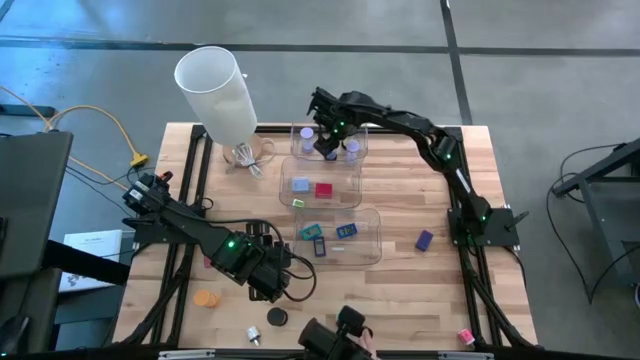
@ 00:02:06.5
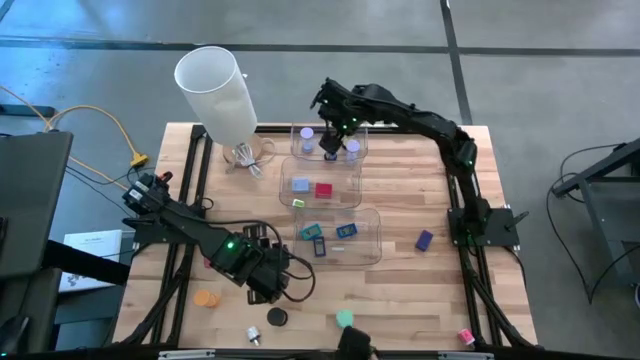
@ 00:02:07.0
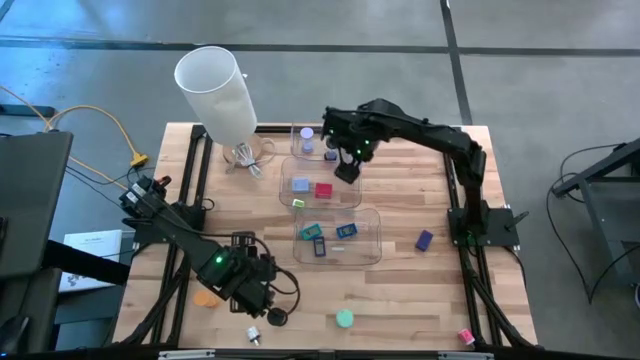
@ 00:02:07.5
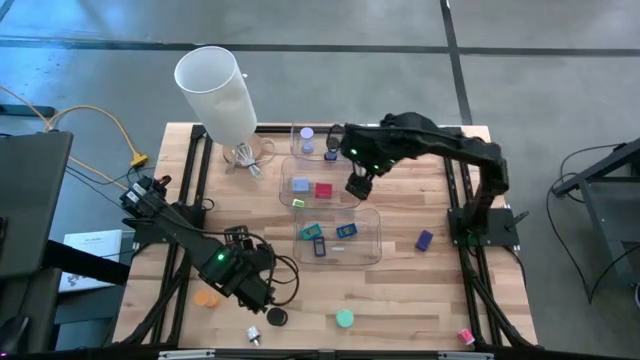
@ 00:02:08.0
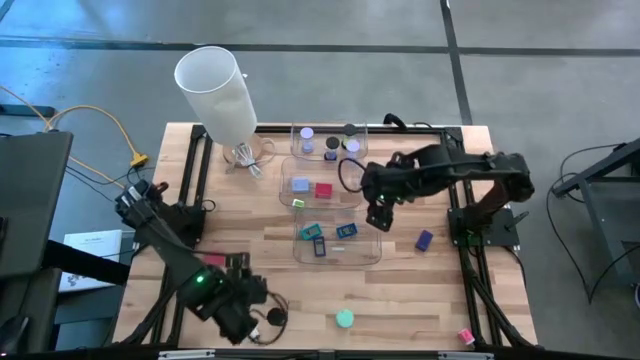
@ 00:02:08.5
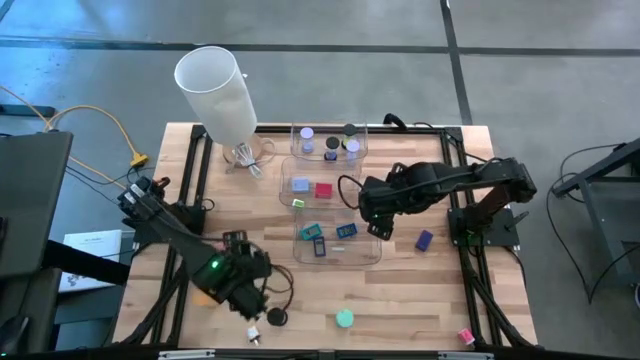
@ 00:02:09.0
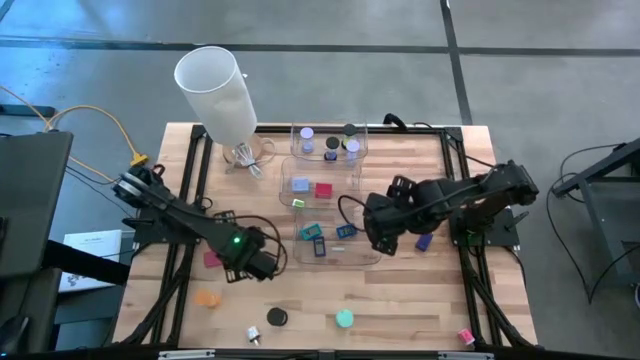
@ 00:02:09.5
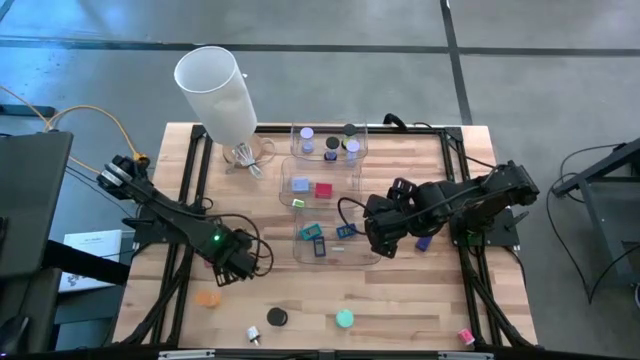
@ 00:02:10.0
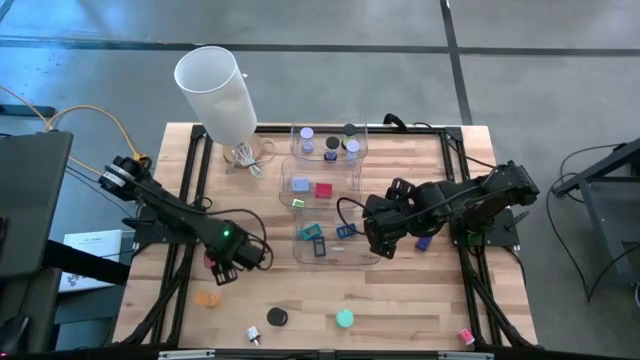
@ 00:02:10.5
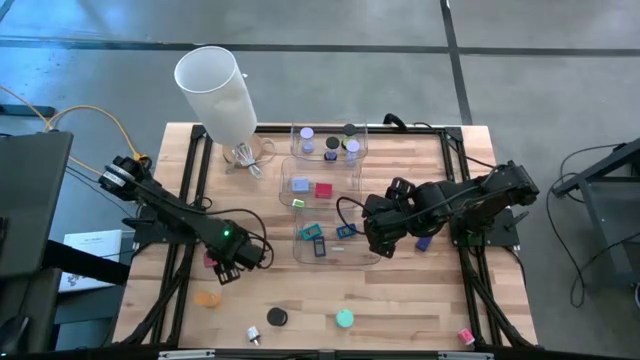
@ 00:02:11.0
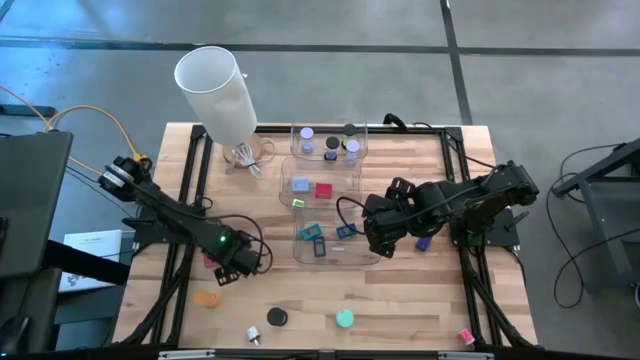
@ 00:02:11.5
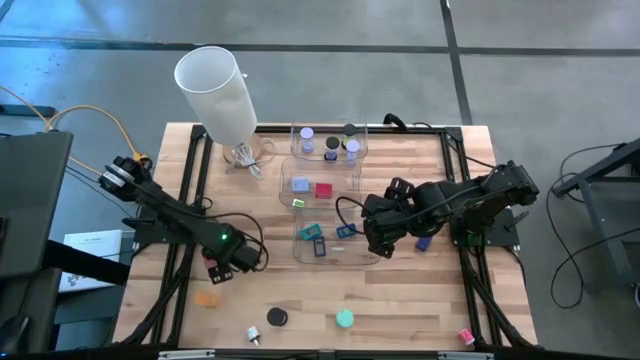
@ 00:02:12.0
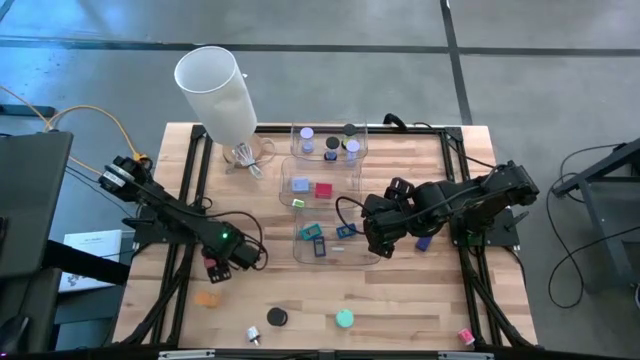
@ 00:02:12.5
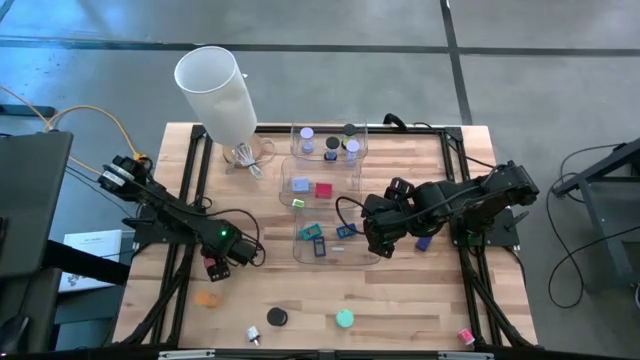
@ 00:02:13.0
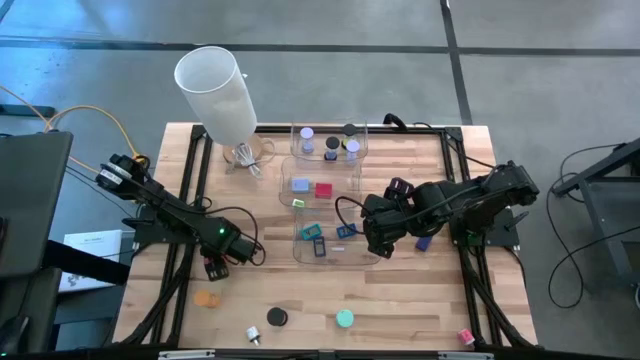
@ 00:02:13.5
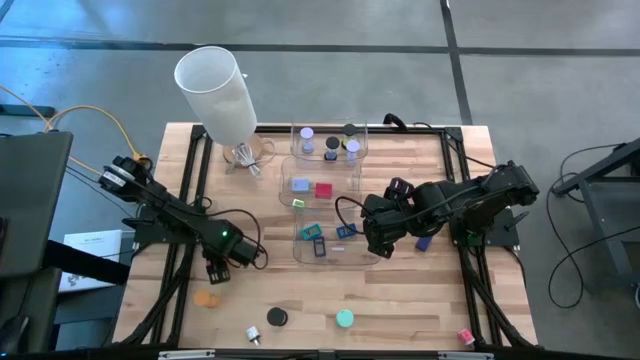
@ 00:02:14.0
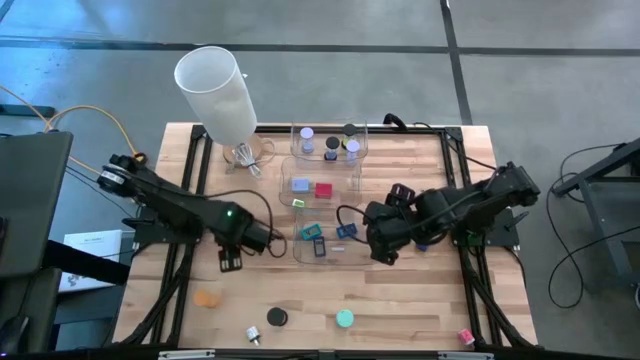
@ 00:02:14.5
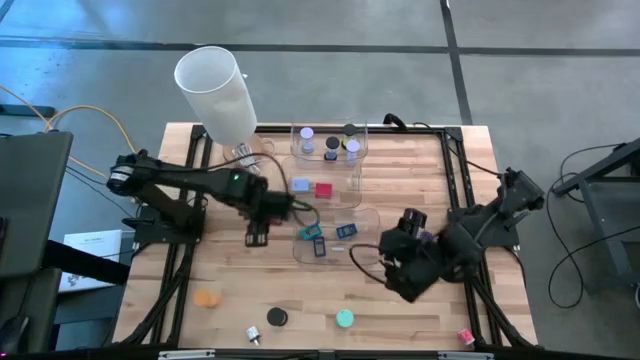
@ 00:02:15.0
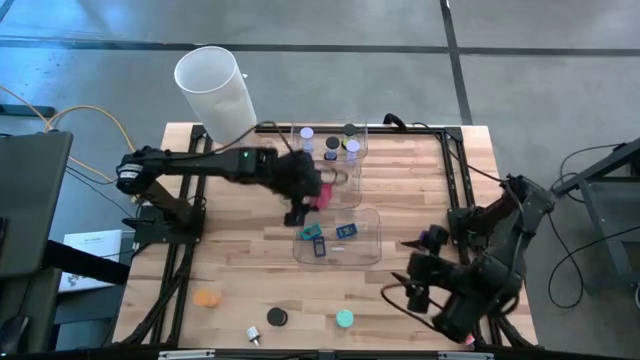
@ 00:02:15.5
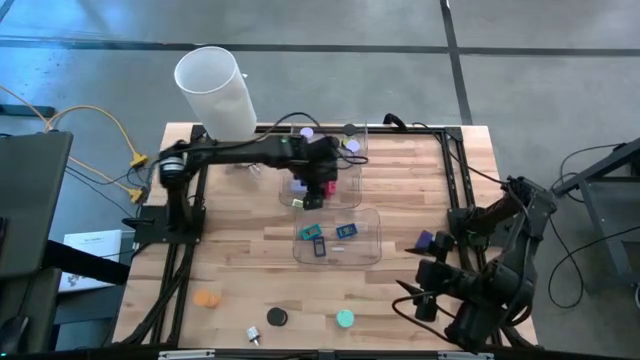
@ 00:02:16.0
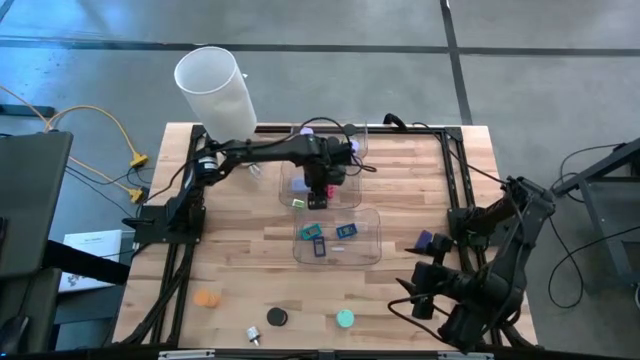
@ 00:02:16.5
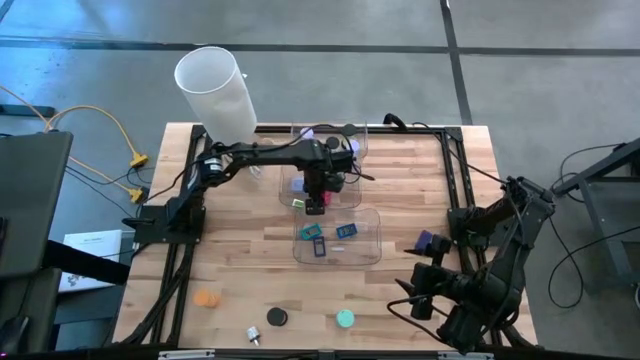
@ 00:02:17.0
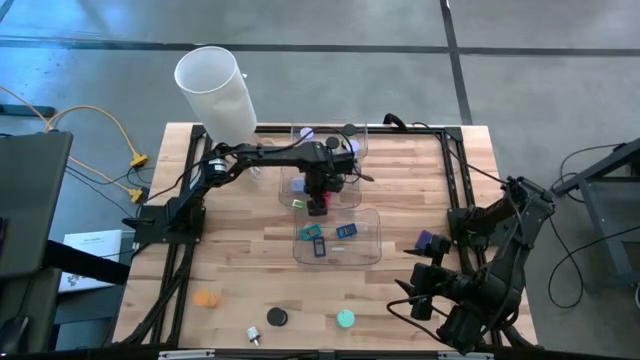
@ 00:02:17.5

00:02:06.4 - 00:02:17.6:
Task: Pick & Place Office items
Put the red charger adapter into the middle transparent bin

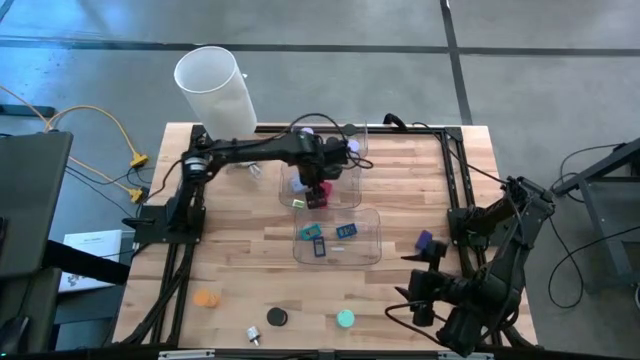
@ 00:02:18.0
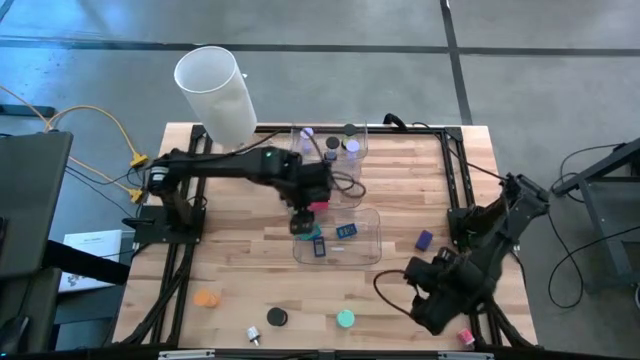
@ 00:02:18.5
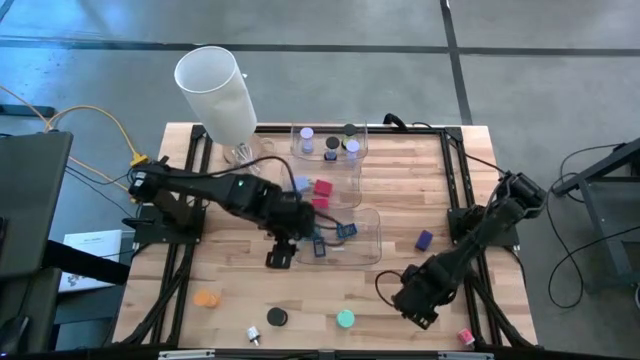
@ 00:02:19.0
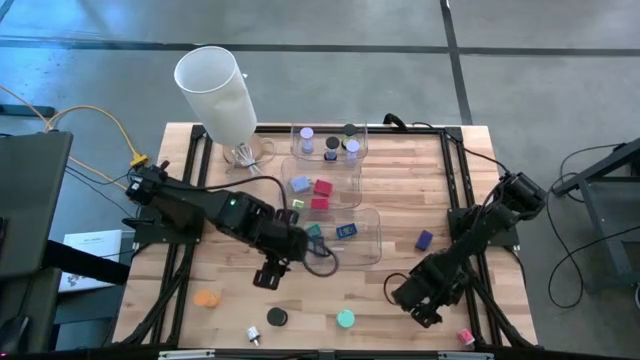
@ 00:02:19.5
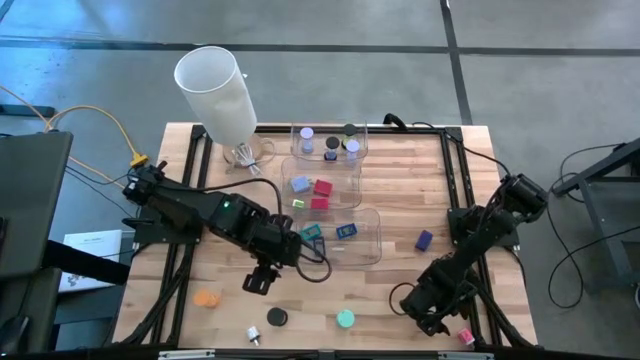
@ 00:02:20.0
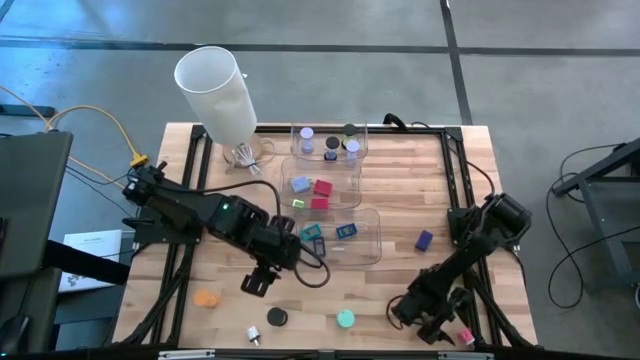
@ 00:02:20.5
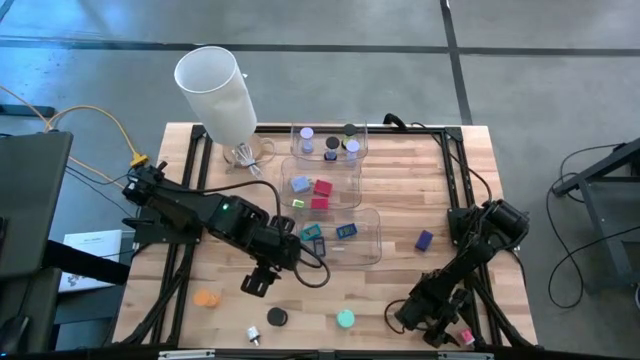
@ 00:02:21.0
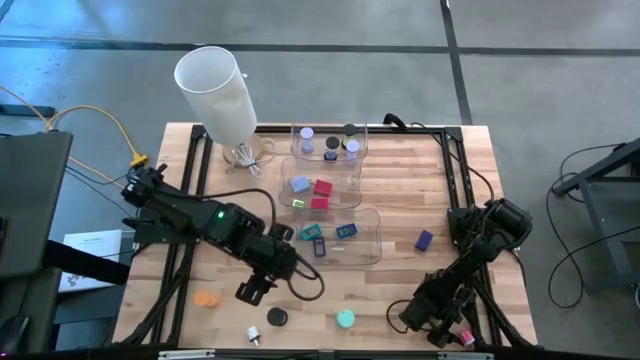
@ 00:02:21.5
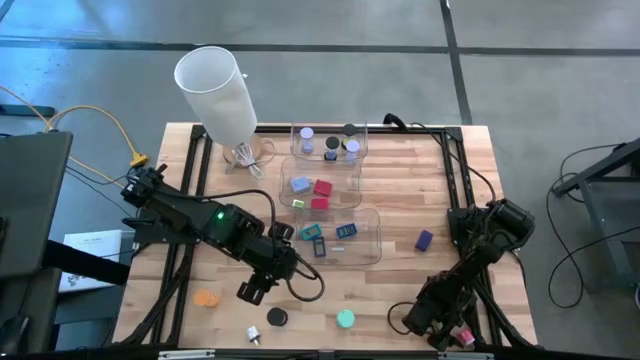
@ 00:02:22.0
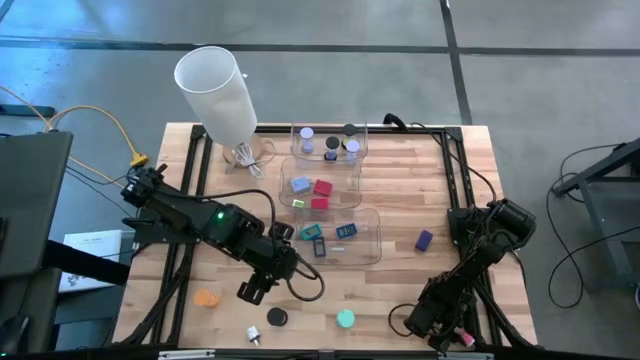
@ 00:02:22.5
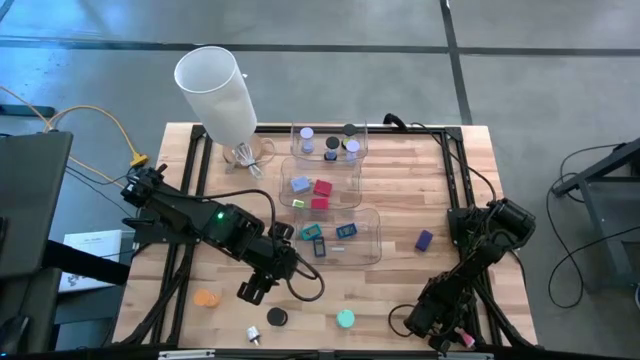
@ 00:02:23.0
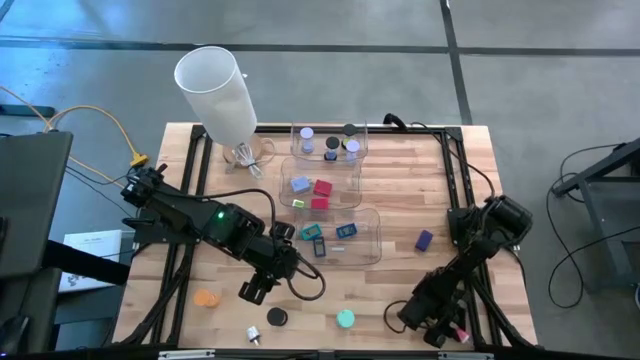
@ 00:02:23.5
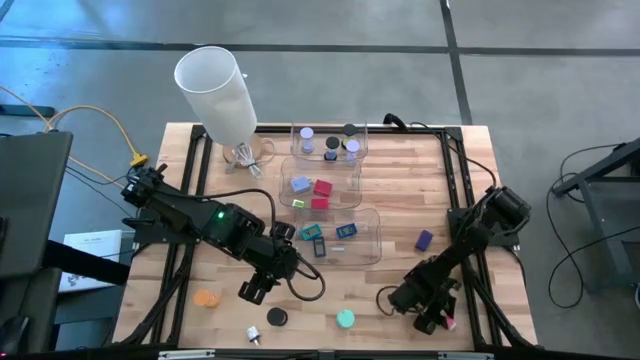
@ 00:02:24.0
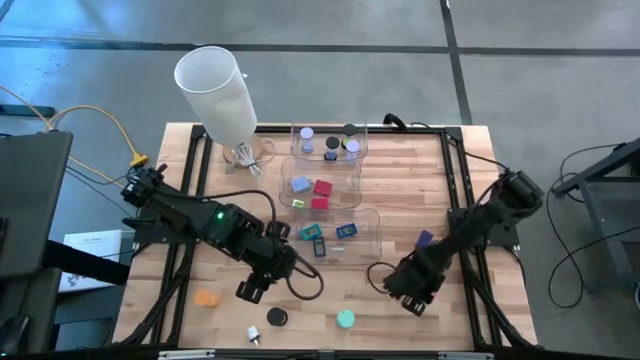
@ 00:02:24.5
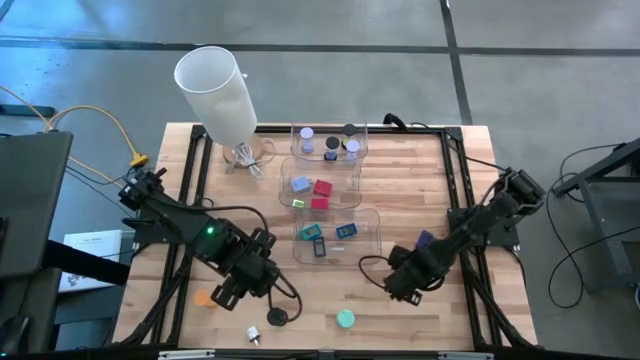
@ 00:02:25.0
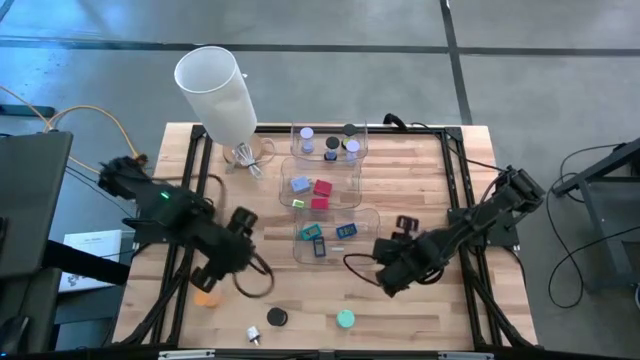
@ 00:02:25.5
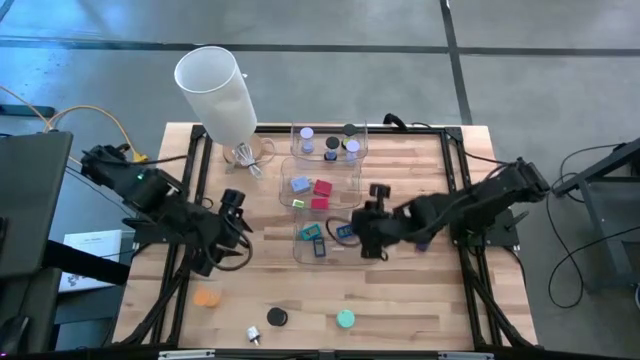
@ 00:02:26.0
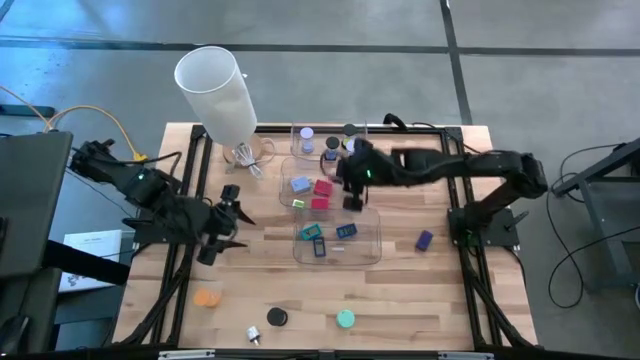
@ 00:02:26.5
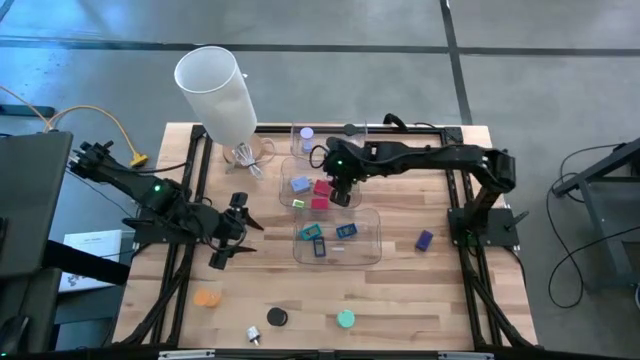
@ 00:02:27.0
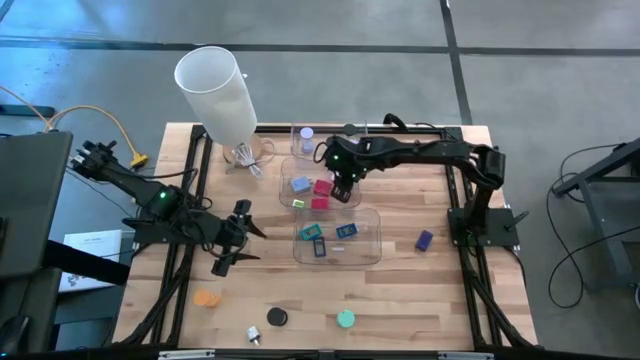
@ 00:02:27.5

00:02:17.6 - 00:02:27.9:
Put the small red charger adapter into the middle transparent bin
